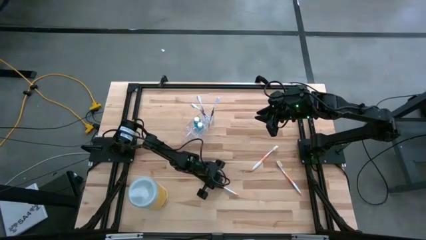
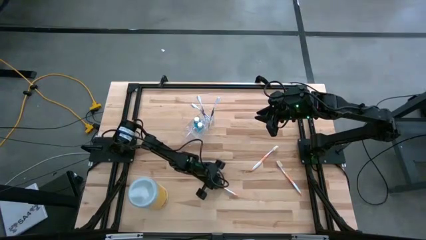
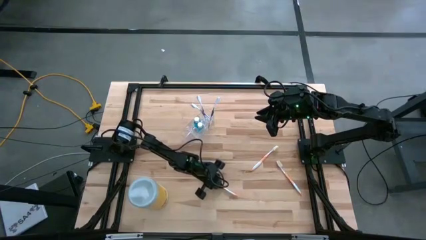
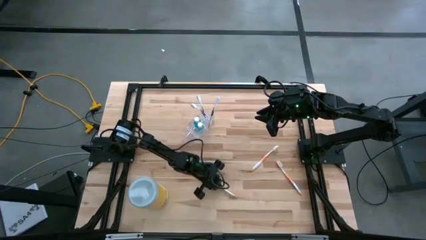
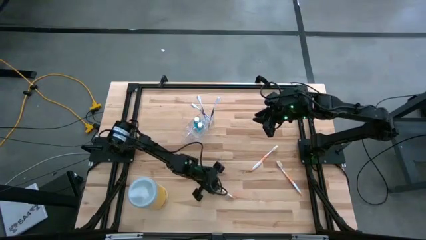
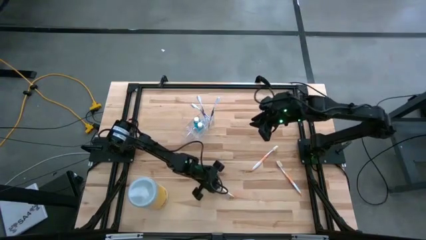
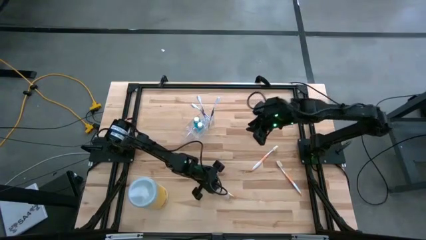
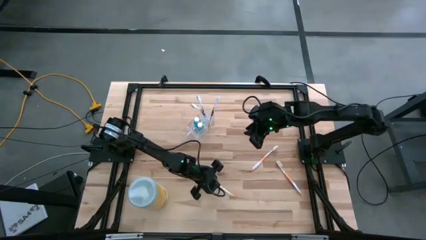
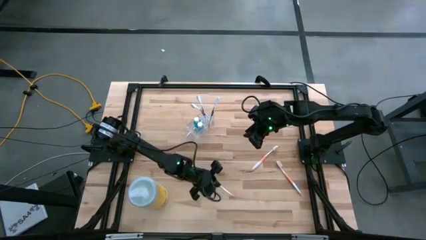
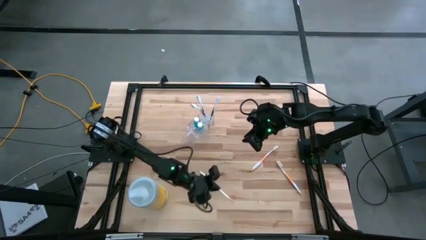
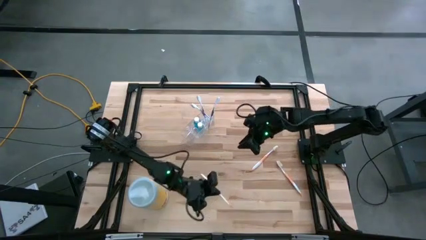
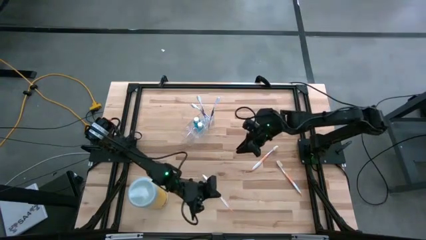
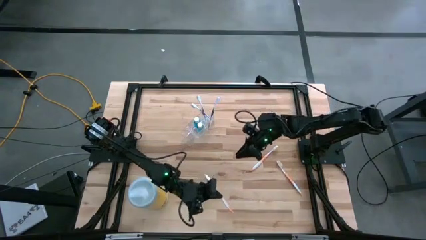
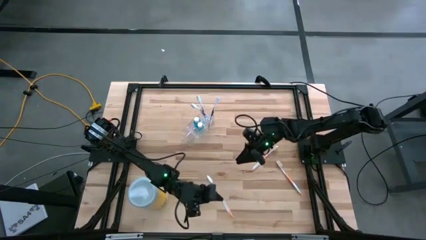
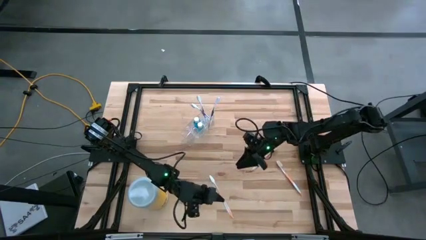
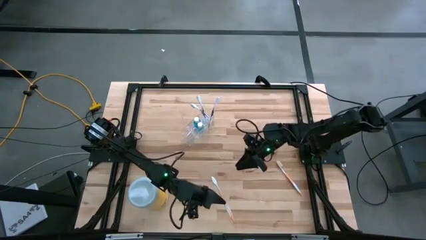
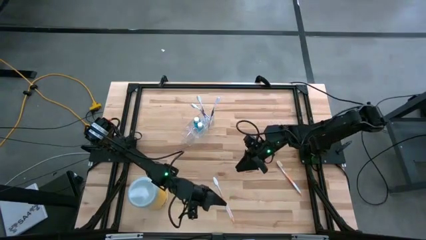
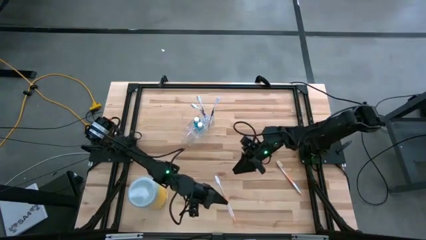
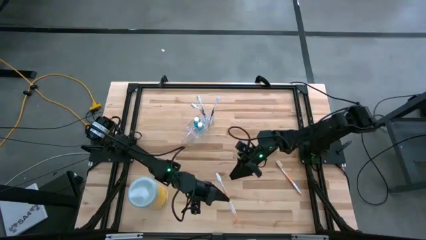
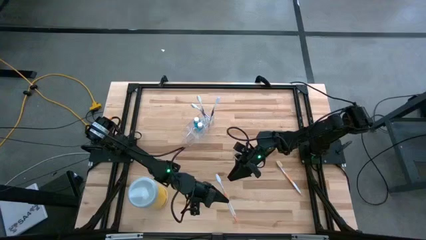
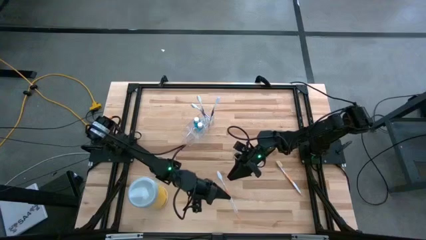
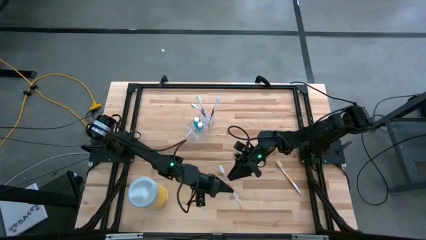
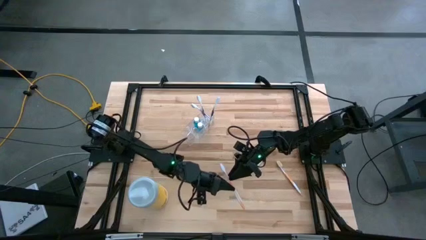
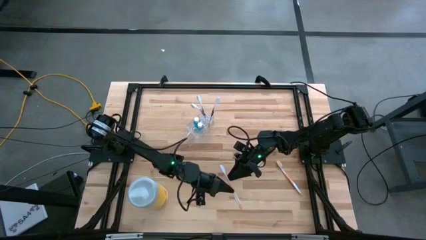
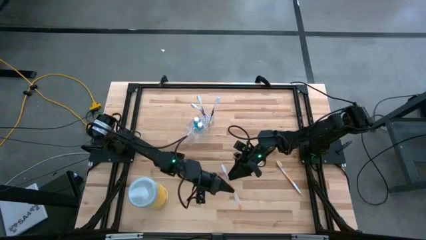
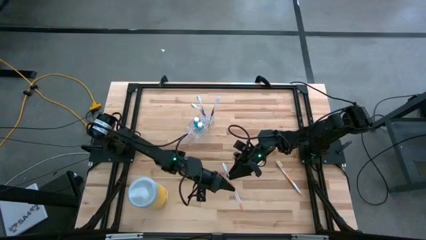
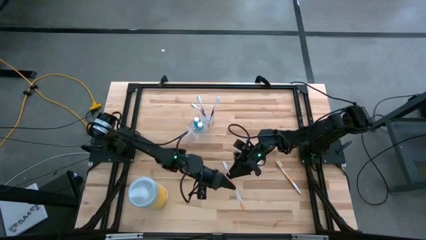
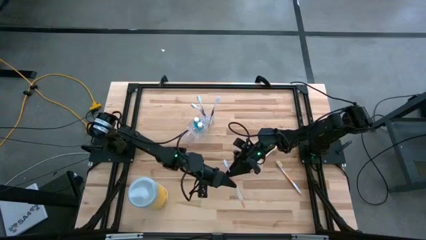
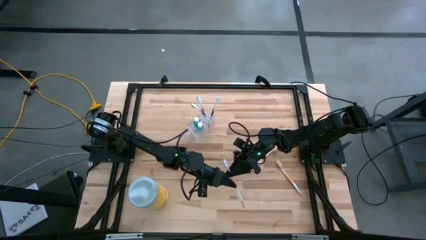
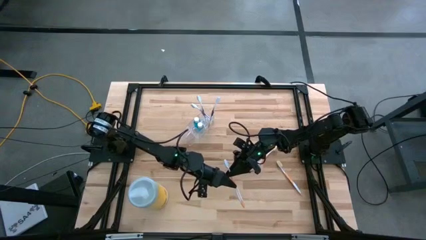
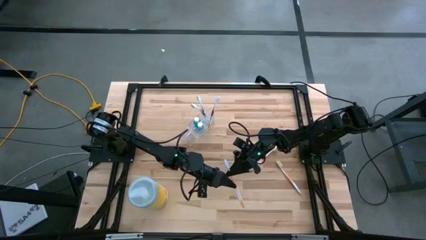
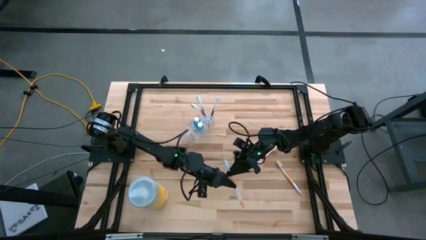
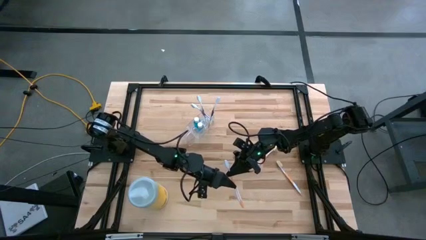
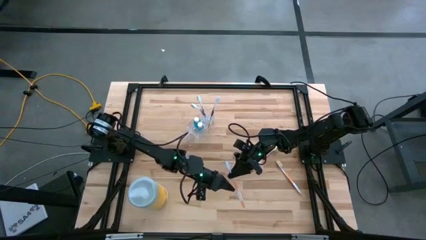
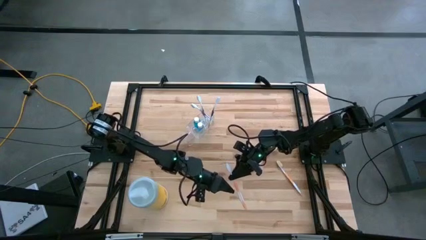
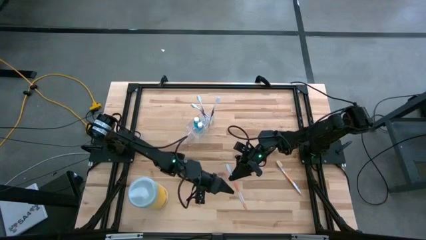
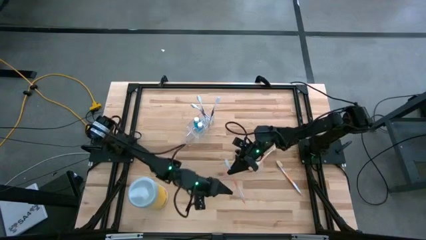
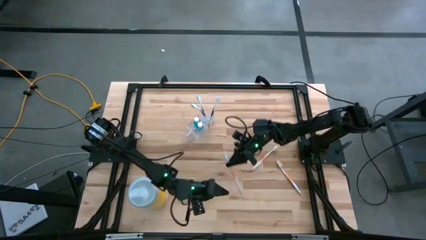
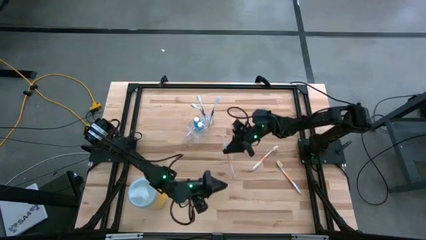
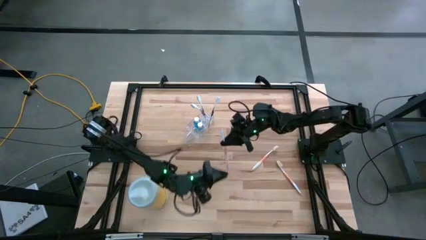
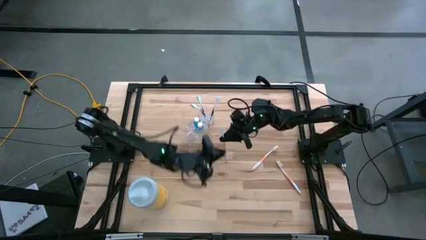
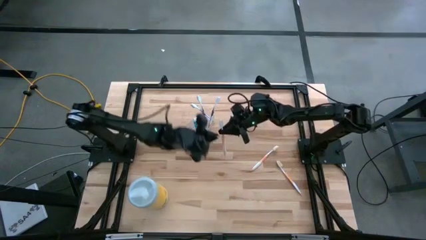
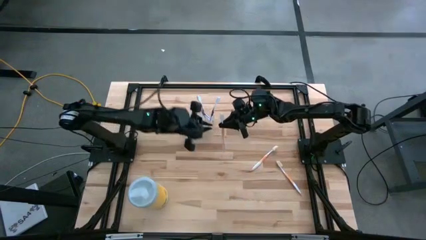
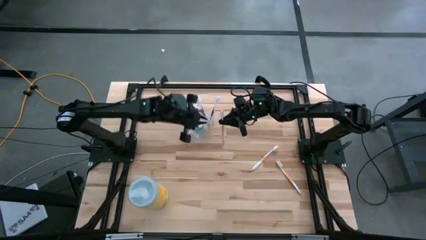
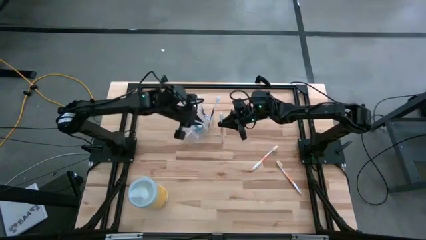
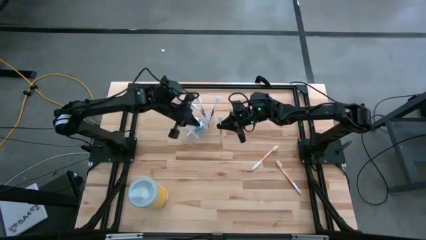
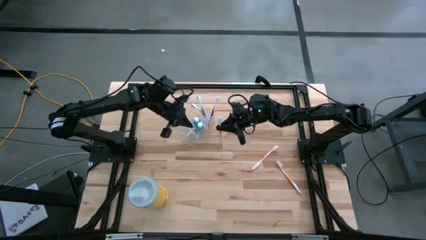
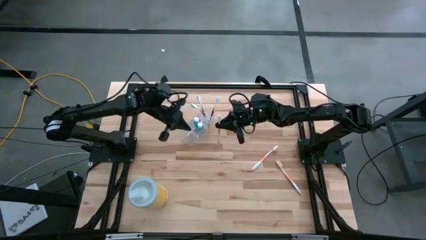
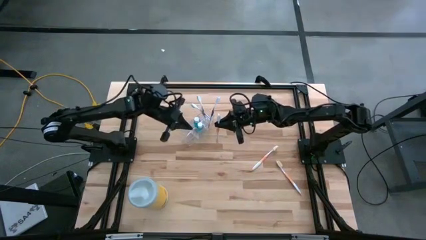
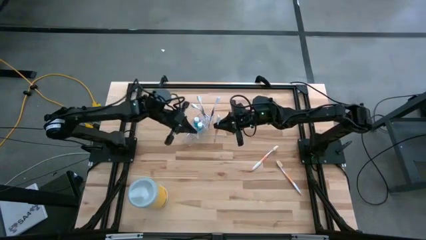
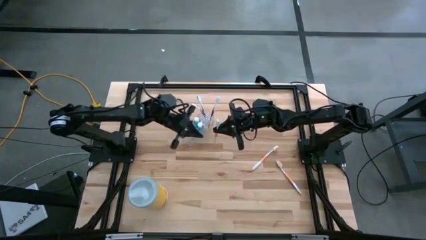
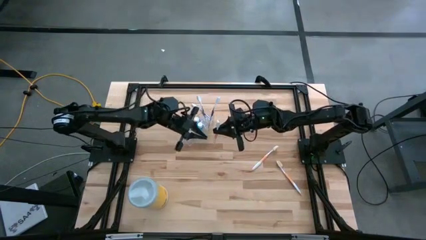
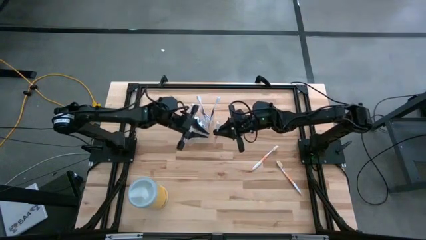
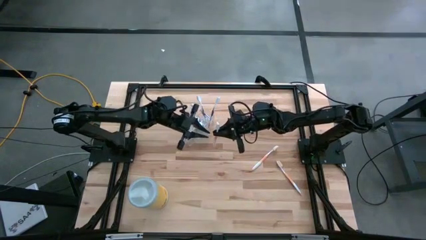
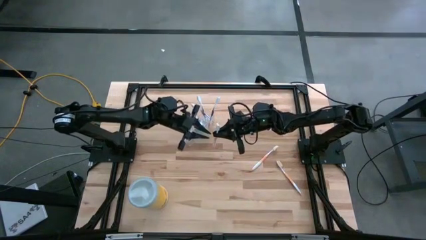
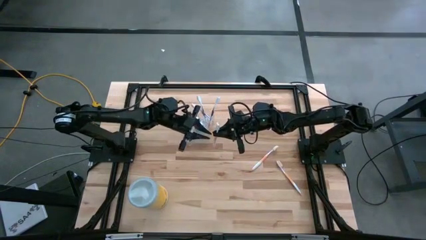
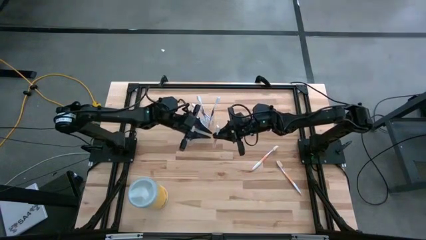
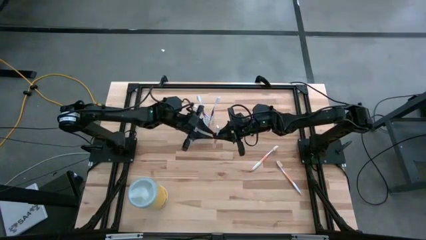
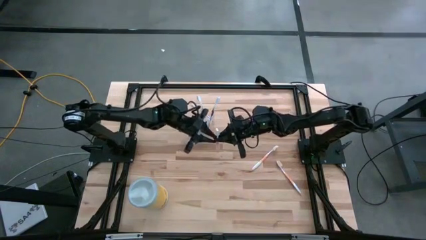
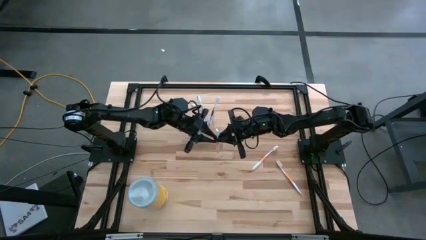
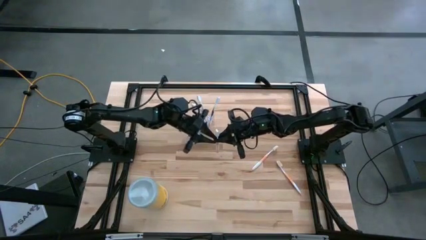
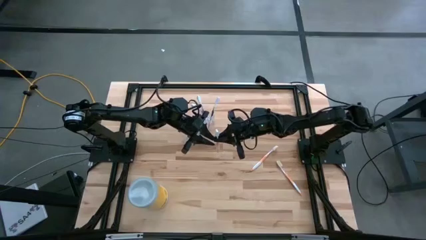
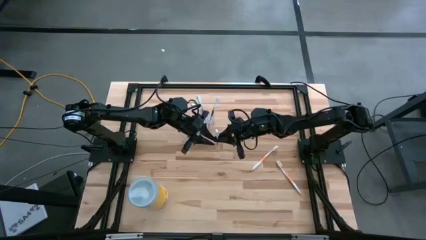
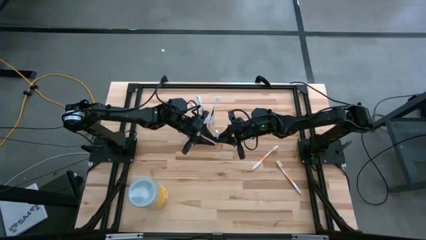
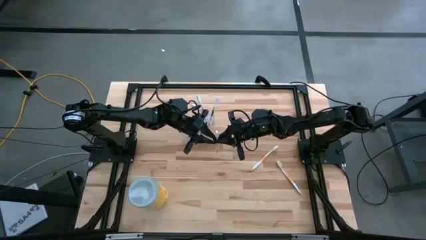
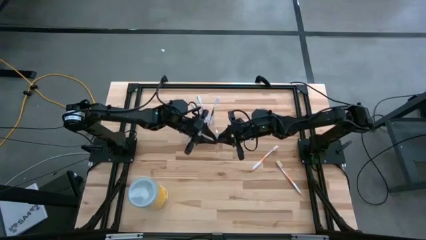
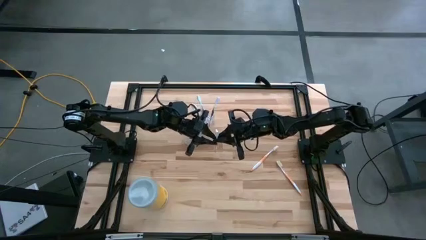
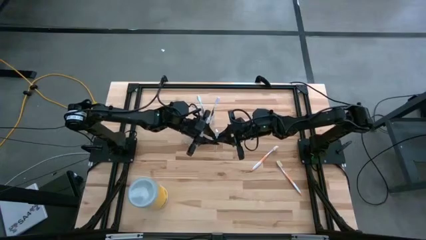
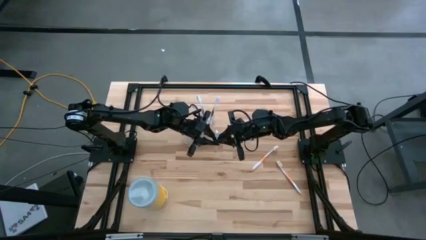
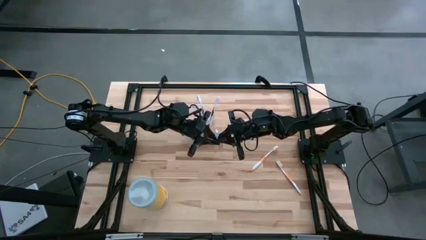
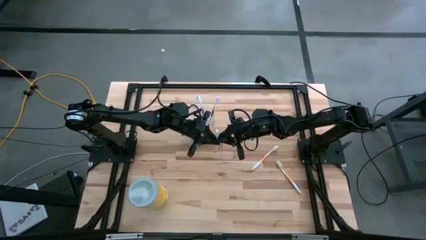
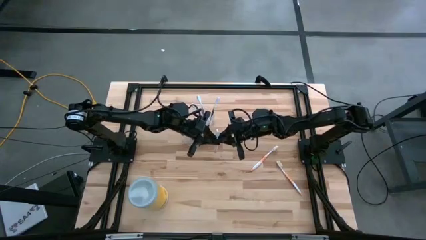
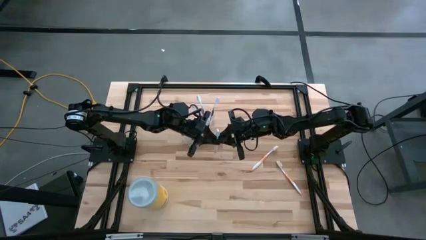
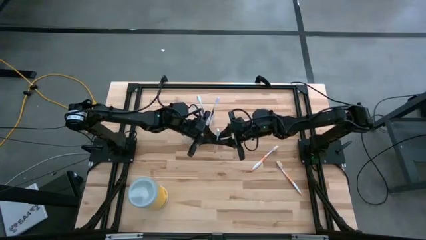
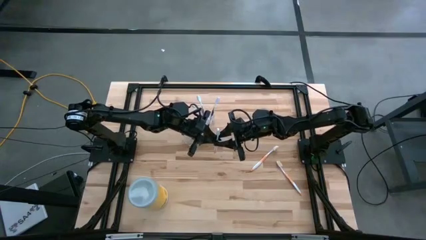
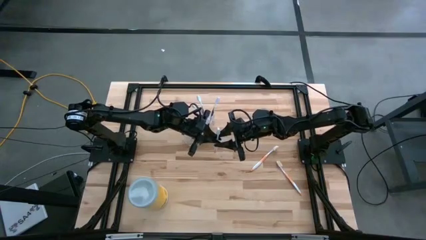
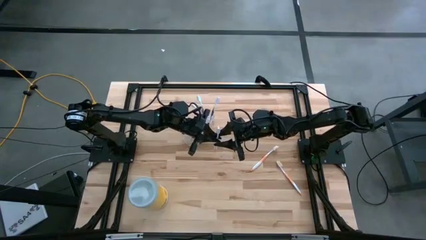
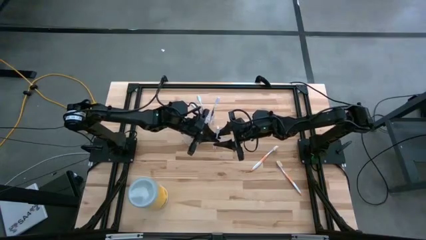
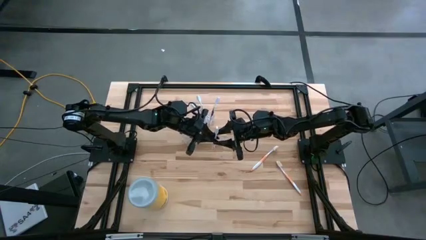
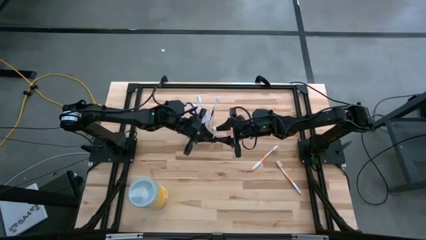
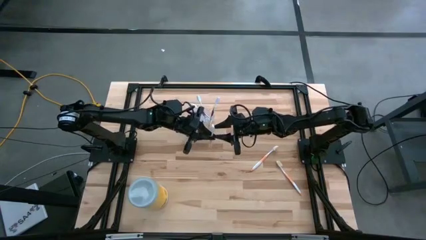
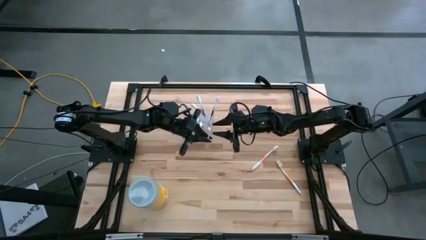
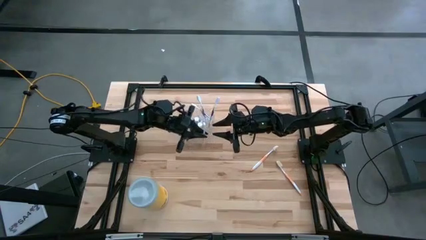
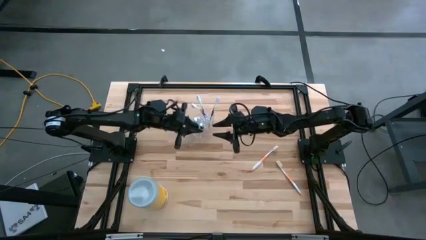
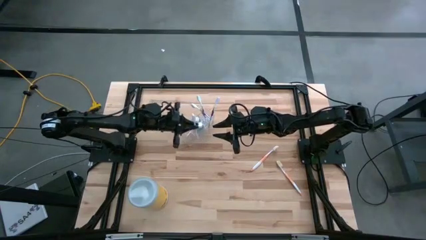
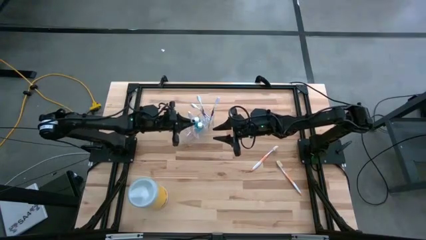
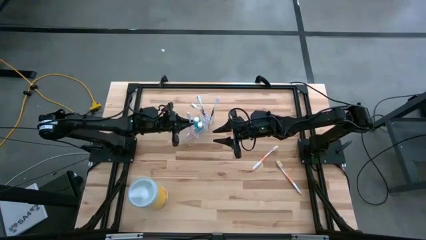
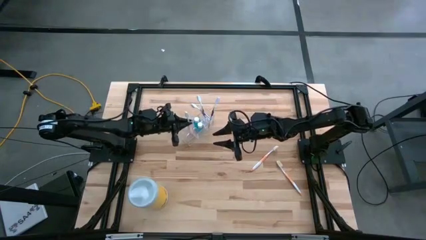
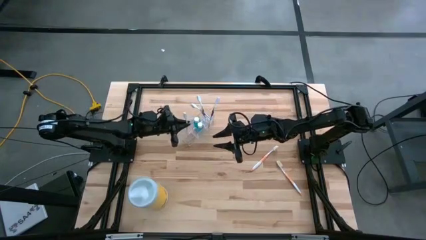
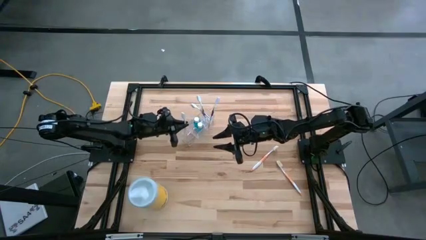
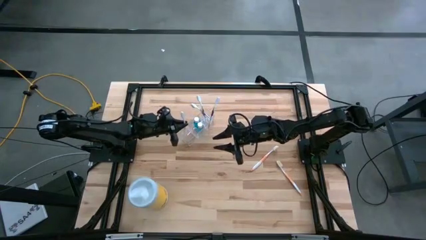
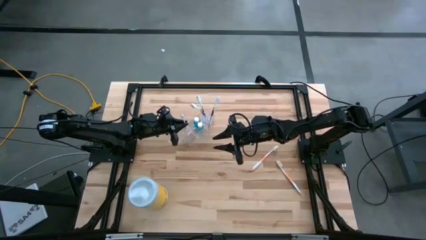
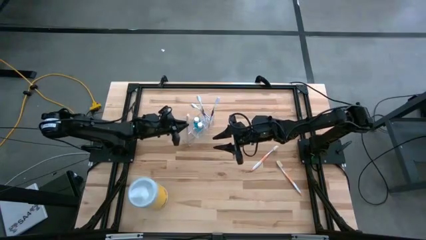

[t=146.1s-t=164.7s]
Task: Pick & Place toothbrushing station
Put the left orange toothbrush into the transparent organizer
